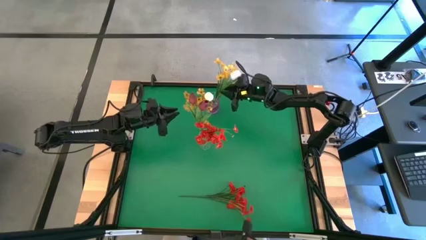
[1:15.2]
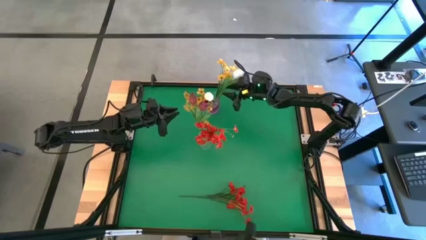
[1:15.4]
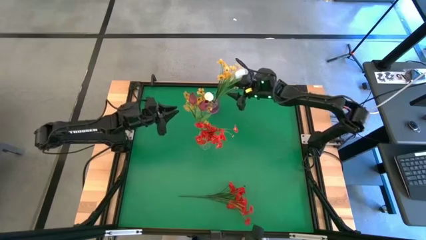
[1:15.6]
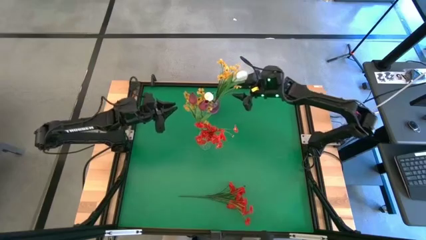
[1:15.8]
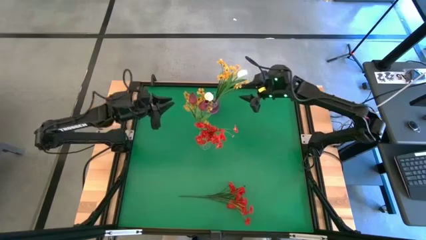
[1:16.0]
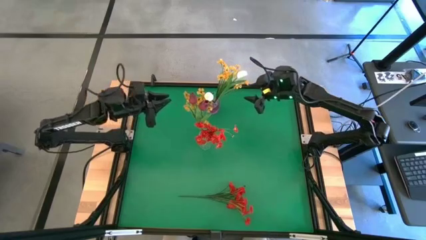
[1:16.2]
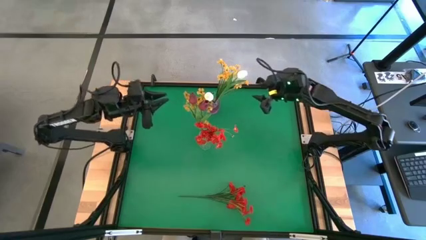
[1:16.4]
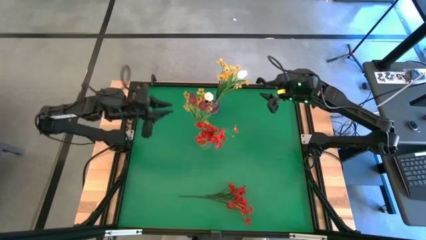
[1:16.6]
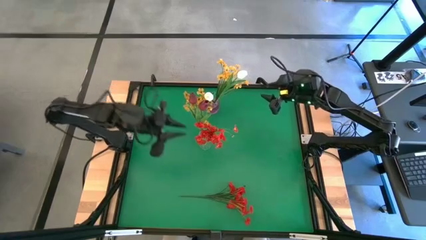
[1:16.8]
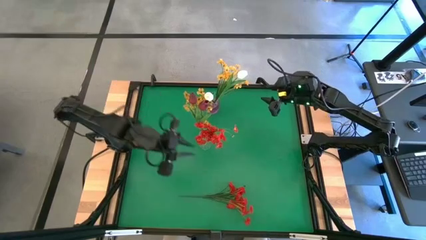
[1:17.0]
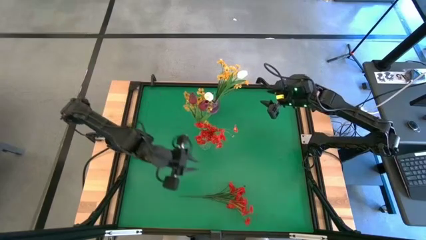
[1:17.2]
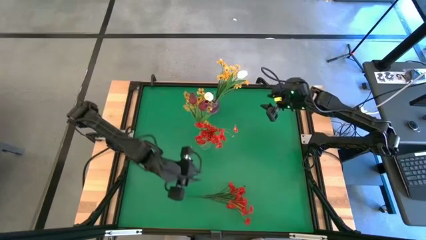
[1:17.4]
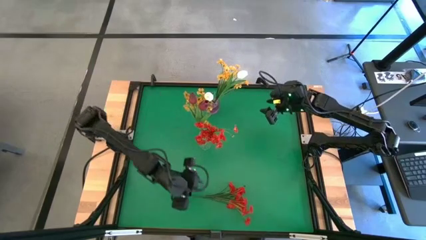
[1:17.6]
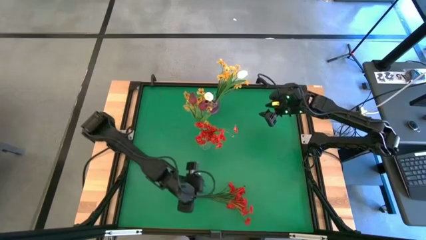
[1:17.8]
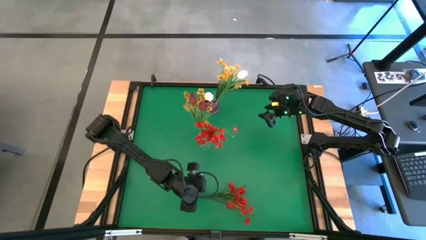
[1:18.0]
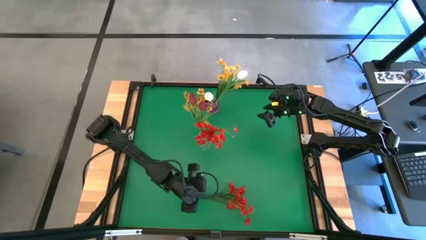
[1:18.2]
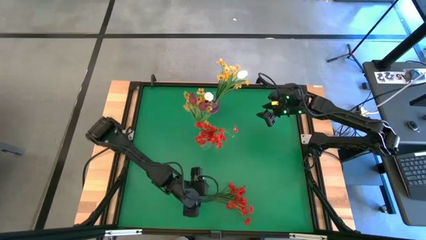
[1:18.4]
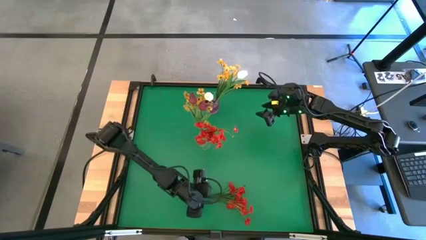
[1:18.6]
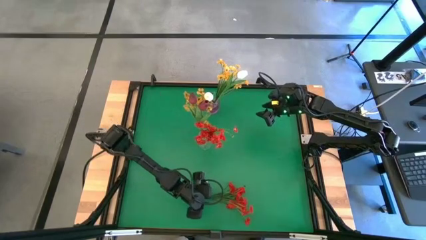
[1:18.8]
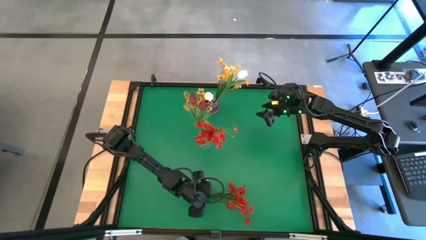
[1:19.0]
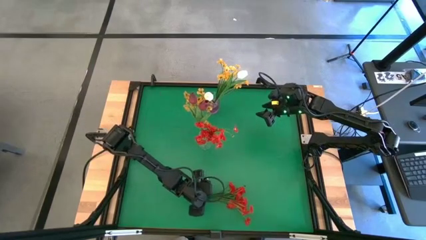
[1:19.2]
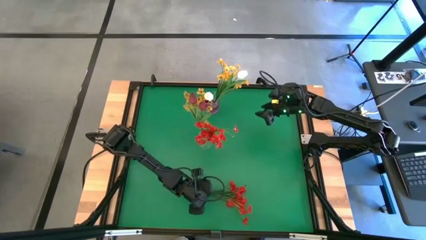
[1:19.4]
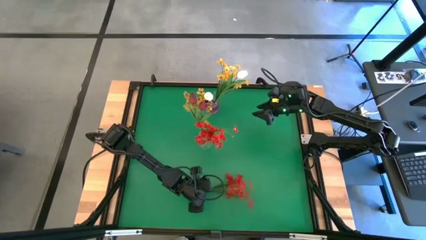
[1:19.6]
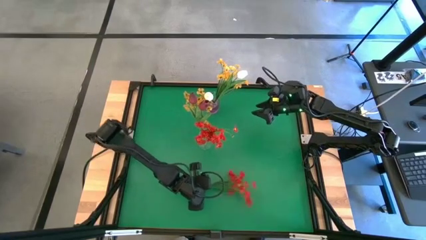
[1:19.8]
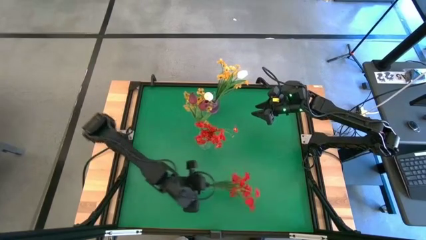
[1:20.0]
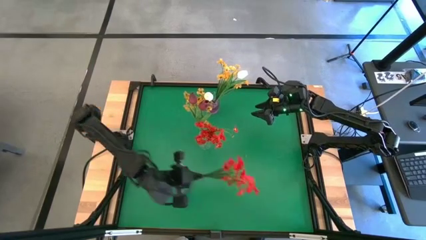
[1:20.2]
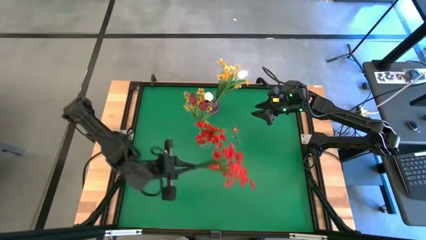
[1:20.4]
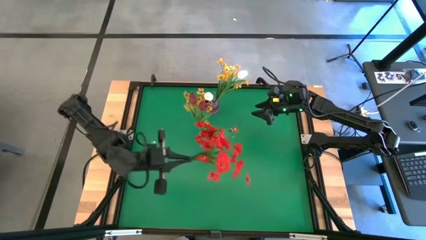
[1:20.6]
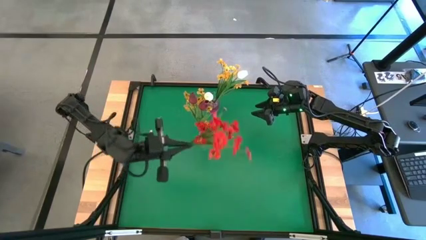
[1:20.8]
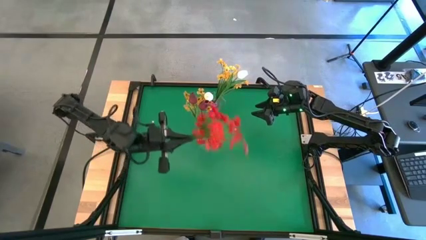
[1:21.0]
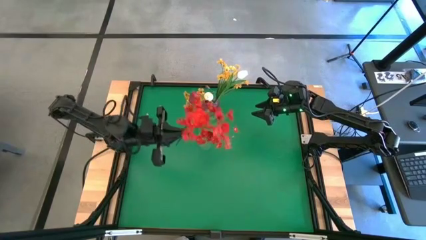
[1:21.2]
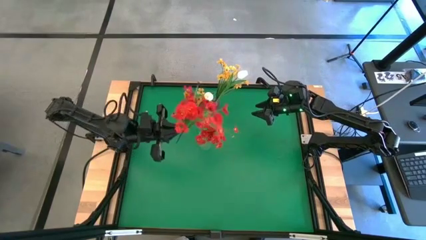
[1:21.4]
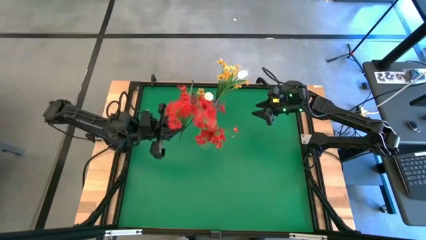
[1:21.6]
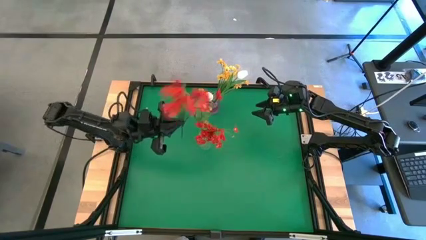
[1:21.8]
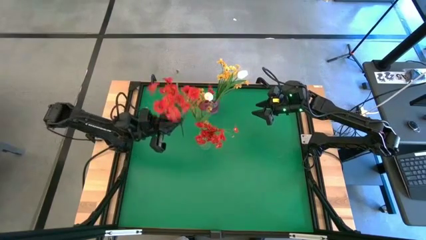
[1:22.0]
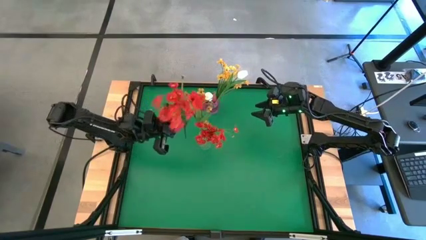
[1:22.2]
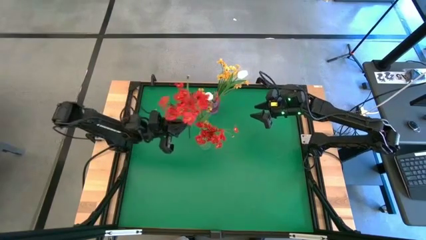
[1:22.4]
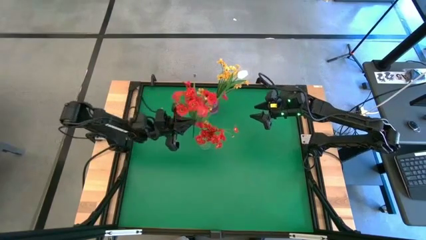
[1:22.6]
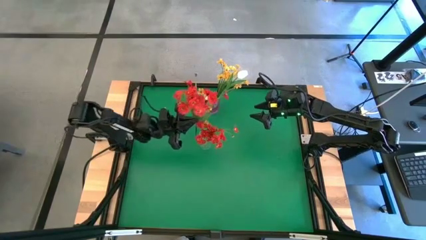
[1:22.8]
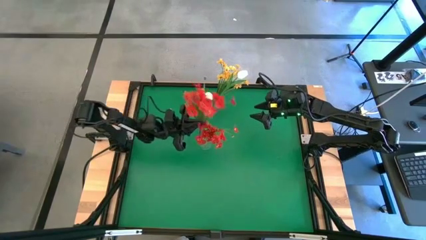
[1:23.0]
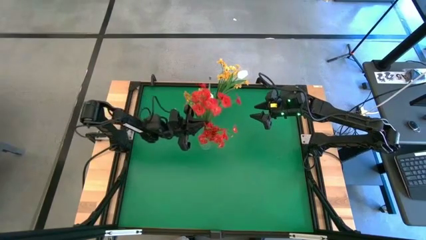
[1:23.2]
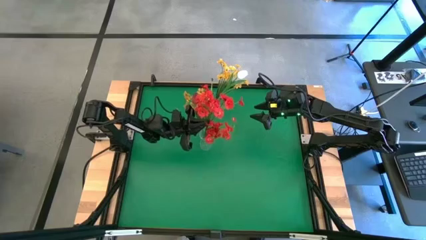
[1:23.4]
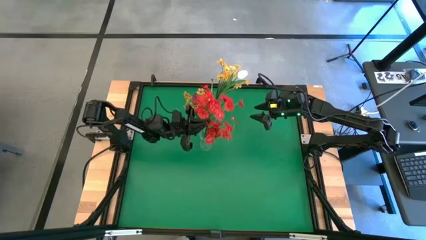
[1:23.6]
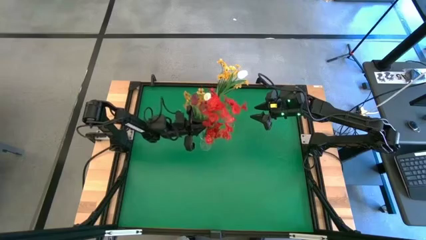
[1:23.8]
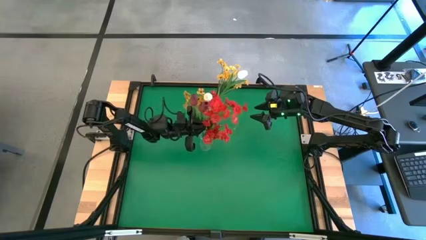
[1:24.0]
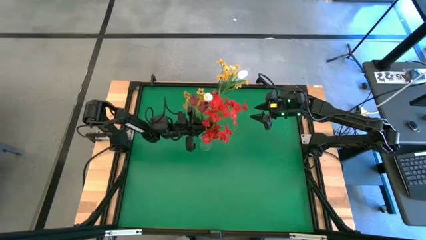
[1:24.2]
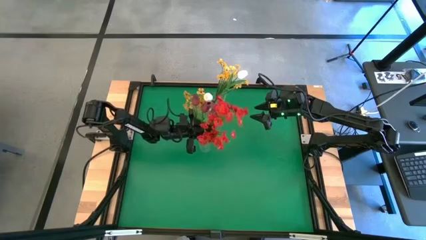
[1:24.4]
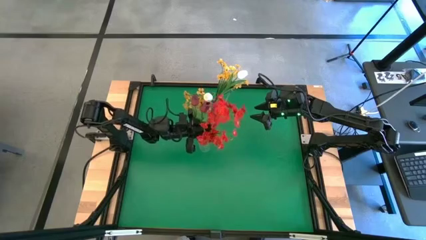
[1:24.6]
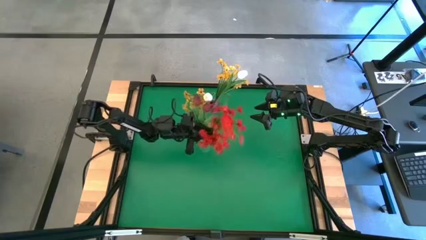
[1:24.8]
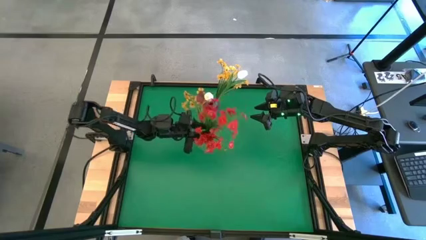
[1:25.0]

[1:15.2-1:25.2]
Task: Sort flowers into vase by color
Put the red flowers into the transparent vase

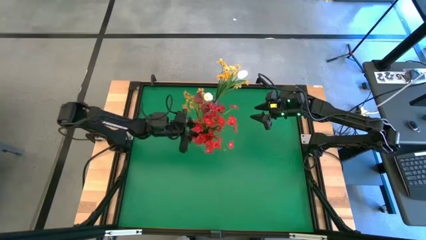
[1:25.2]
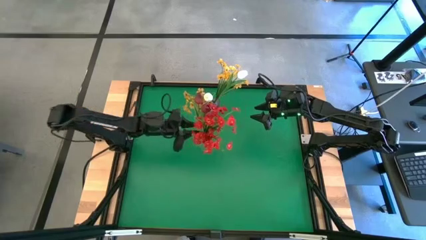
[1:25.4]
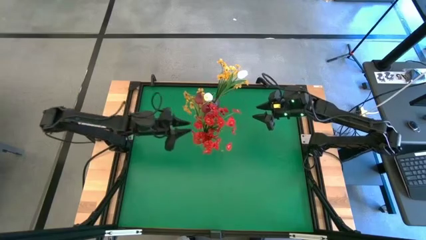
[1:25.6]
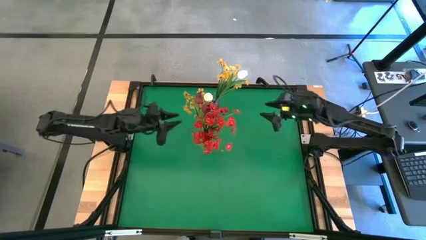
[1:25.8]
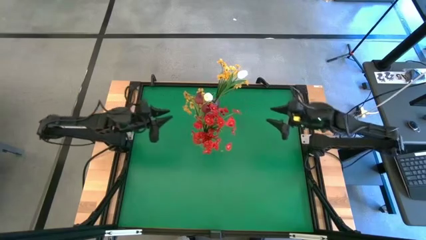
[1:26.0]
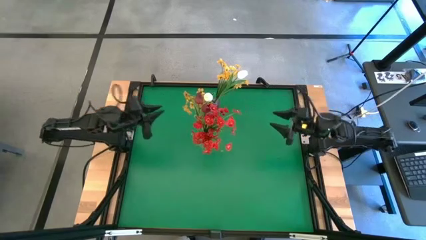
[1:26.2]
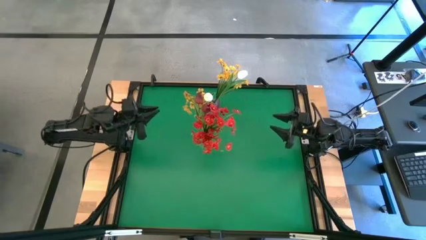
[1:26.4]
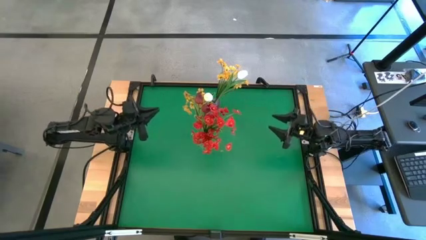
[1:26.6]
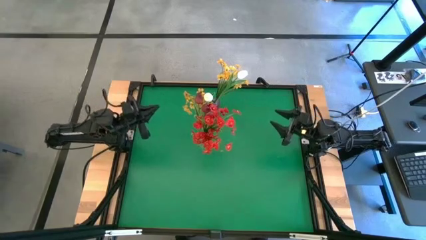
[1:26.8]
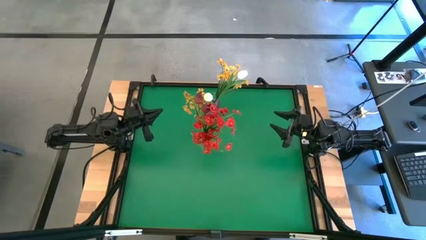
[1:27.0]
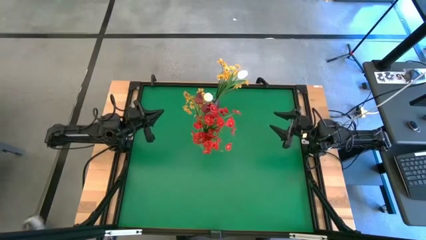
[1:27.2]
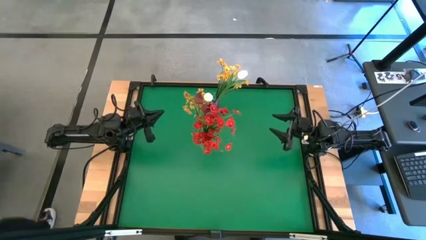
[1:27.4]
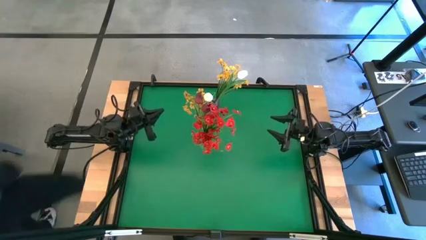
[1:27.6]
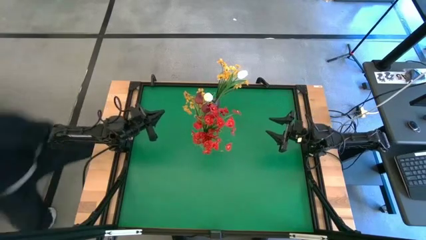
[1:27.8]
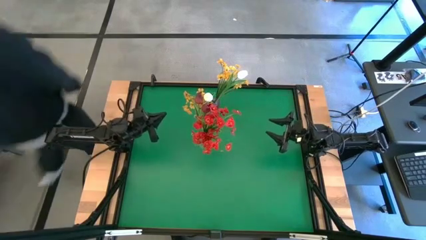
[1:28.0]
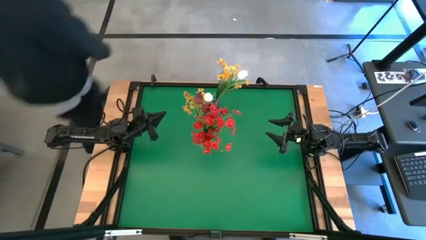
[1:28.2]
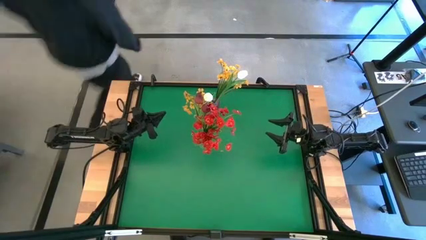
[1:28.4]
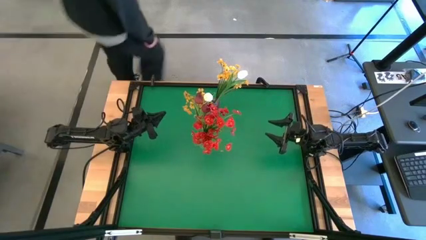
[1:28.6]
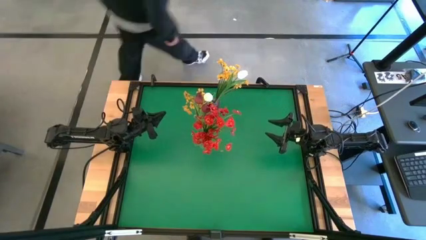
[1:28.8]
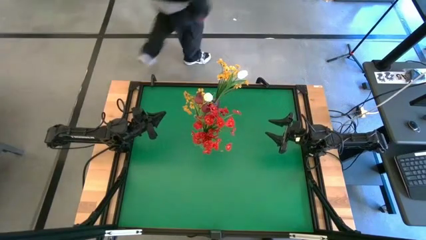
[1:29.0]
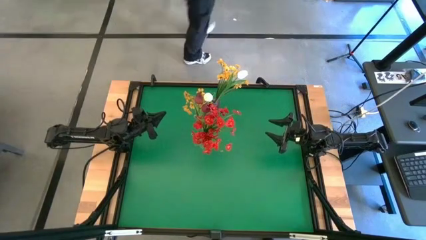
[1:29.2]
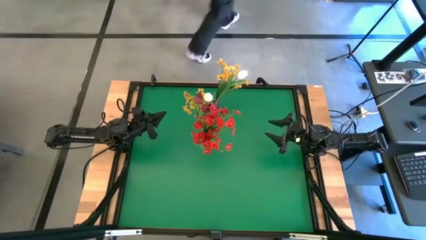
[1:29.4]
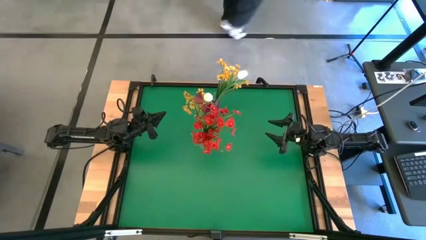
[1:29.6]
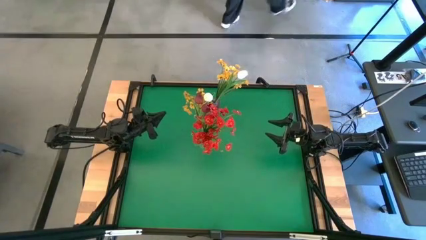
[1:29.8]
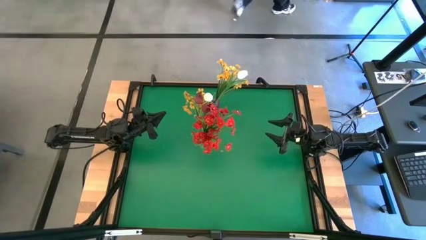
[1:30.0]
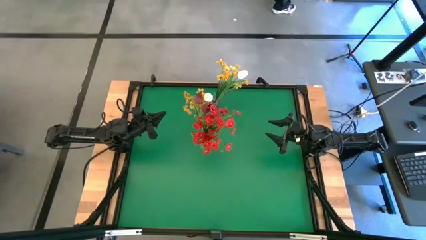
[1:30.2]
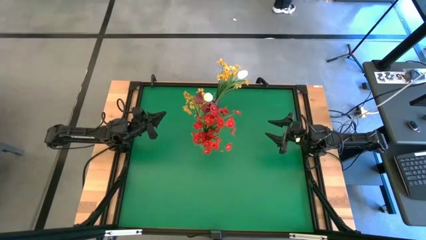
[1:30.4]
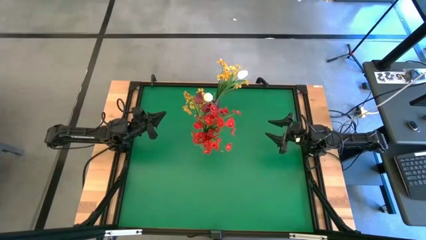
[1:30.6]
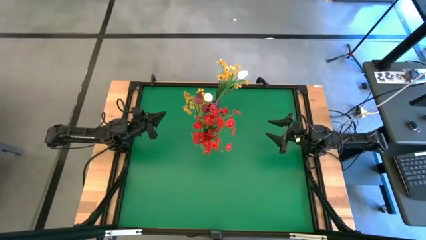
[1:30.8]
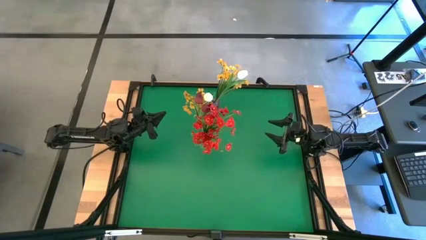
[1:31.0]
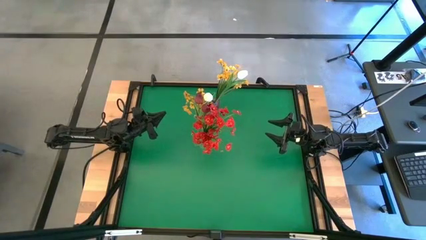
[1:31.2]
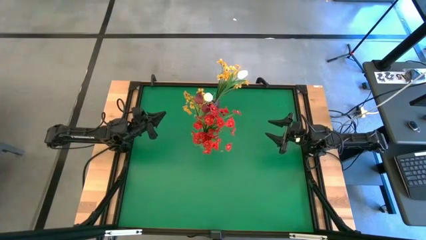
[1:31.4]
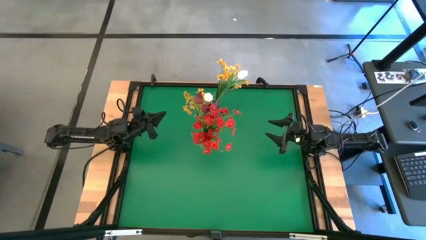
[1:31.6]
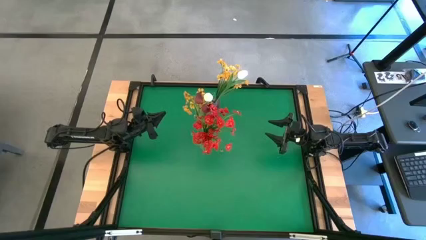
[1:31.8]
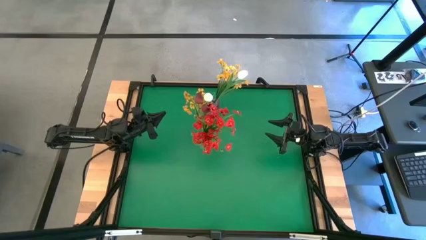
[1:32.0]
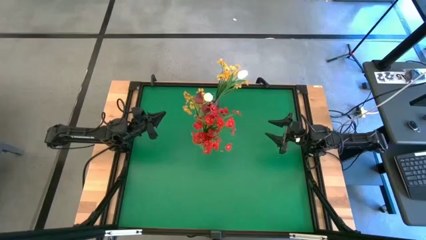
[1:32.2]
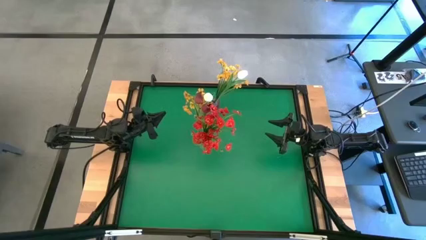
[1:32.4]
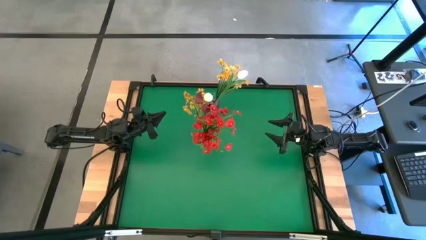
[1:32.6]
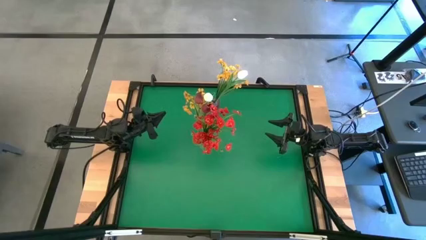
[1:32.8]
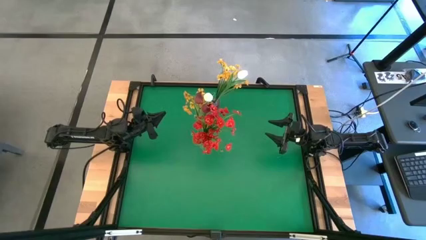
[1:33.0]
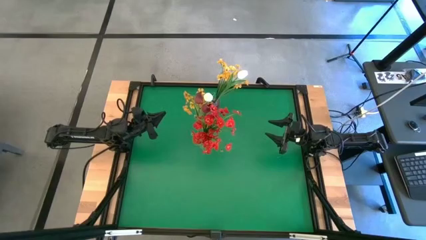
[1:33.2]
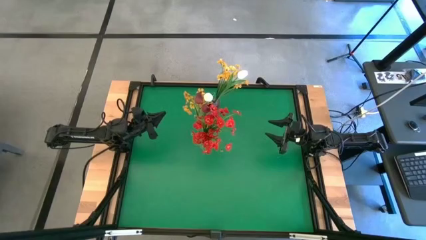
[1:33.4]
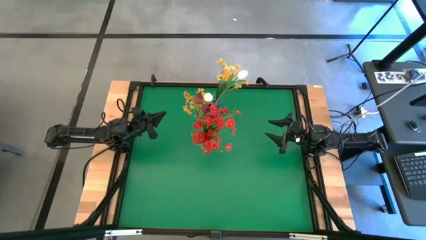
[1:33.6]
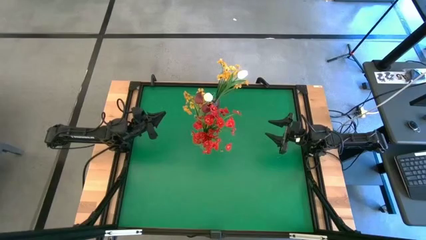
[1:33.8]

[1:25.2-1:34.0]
Return to Home Position
